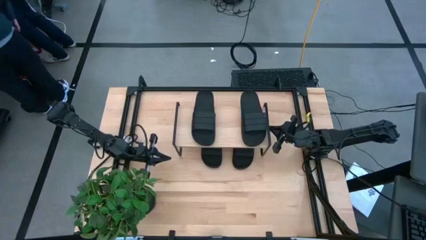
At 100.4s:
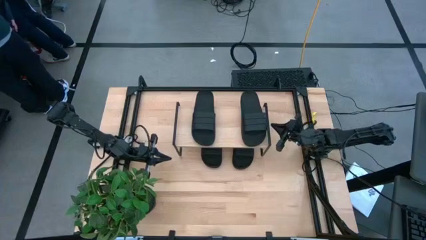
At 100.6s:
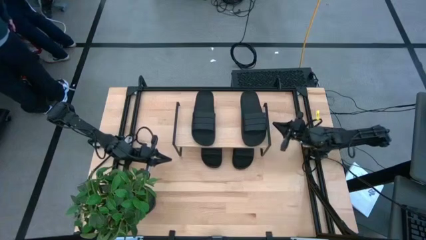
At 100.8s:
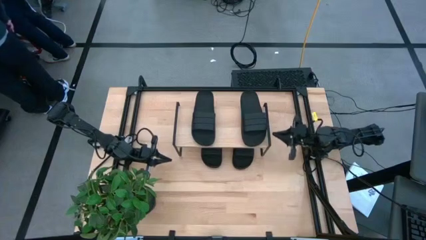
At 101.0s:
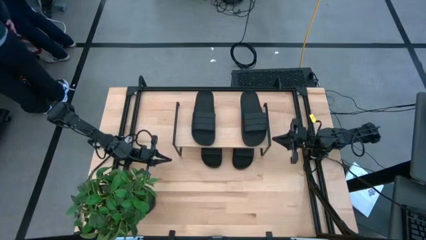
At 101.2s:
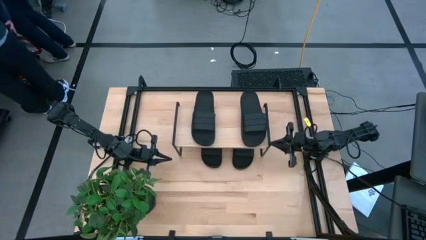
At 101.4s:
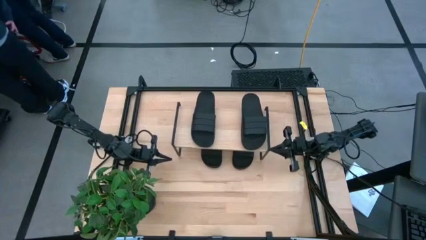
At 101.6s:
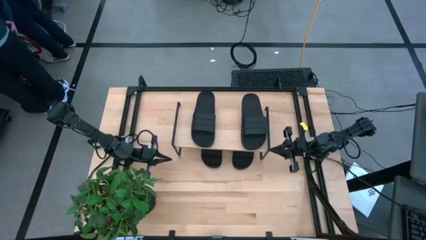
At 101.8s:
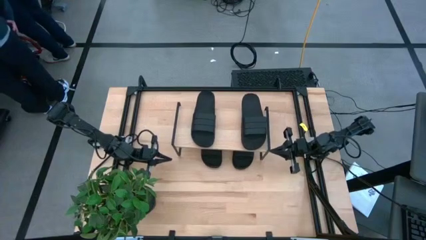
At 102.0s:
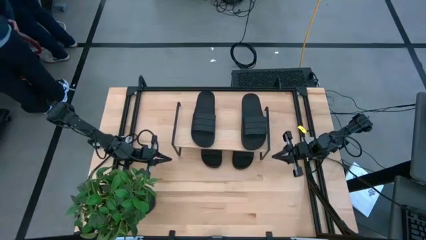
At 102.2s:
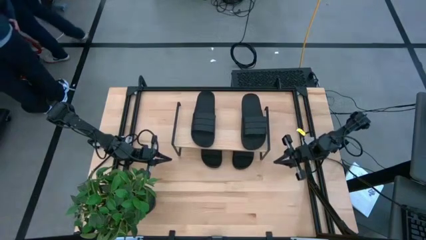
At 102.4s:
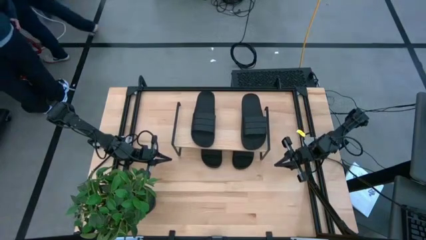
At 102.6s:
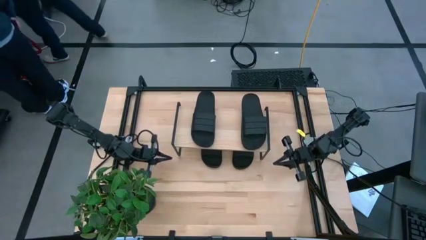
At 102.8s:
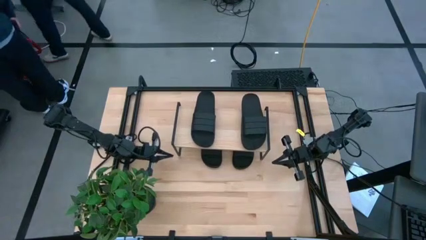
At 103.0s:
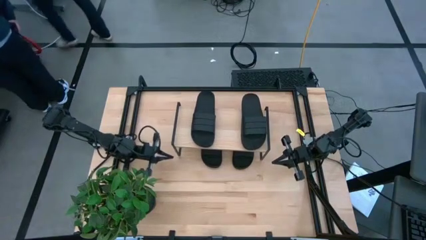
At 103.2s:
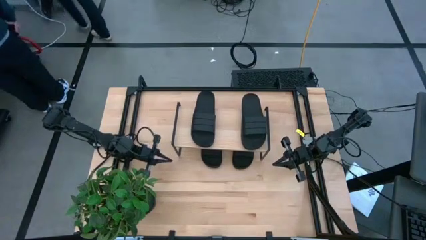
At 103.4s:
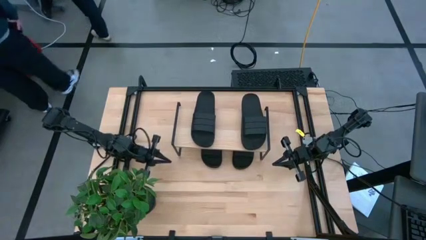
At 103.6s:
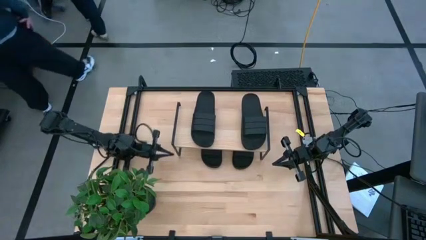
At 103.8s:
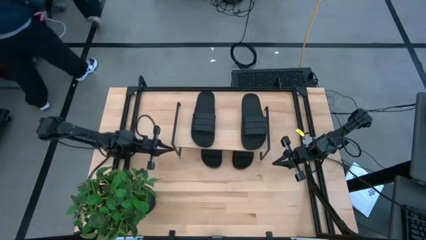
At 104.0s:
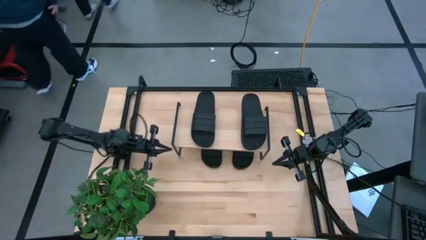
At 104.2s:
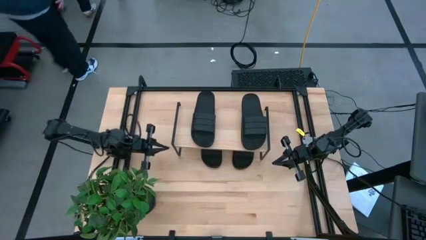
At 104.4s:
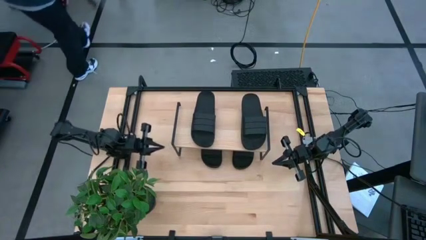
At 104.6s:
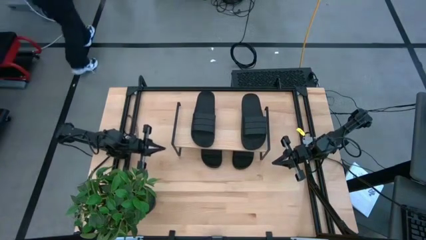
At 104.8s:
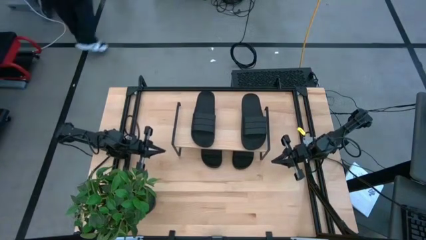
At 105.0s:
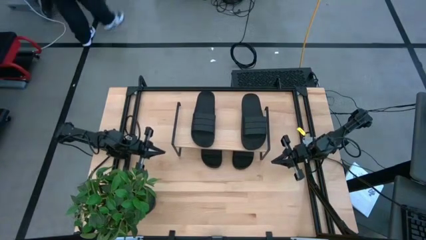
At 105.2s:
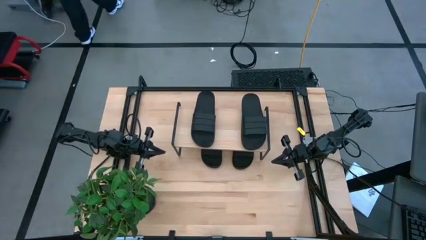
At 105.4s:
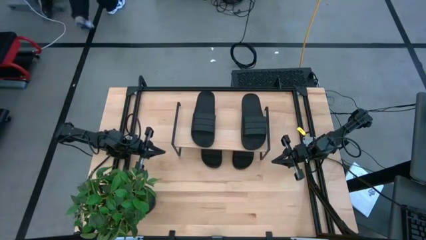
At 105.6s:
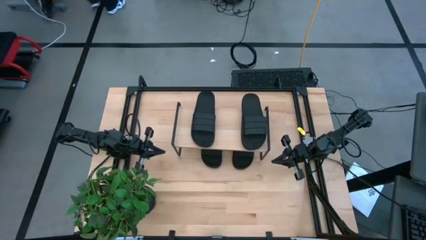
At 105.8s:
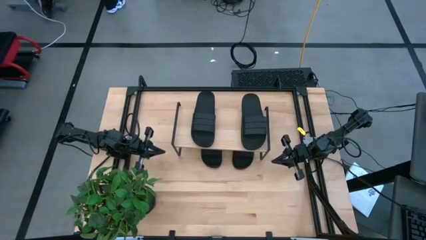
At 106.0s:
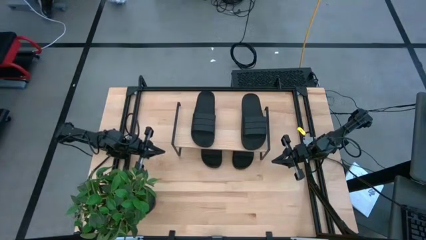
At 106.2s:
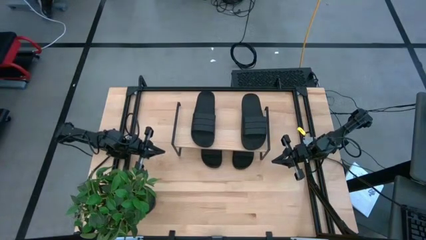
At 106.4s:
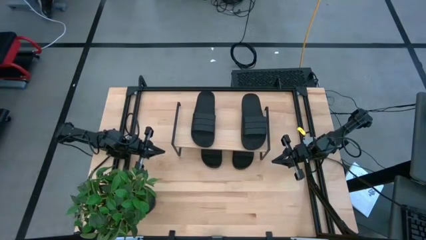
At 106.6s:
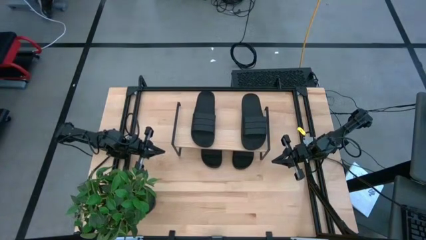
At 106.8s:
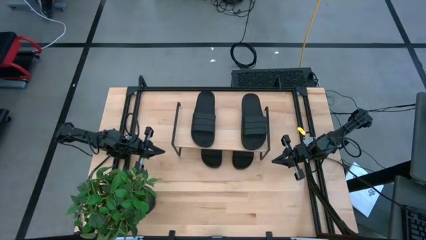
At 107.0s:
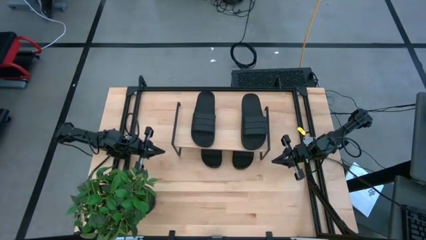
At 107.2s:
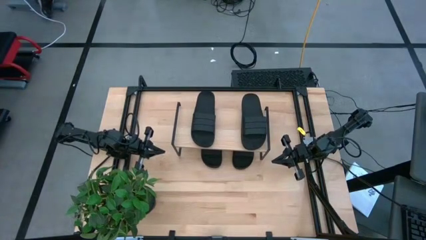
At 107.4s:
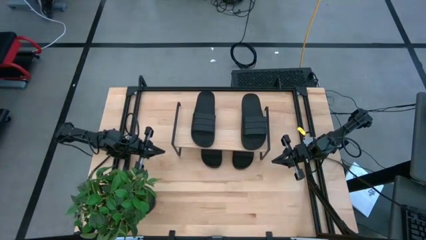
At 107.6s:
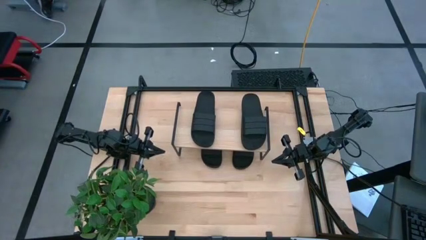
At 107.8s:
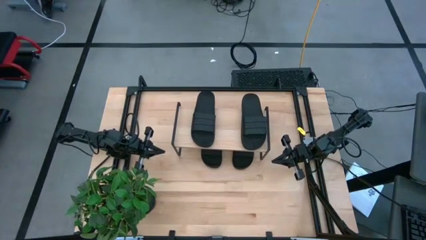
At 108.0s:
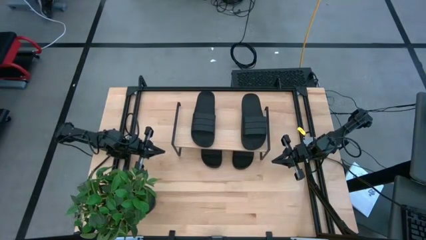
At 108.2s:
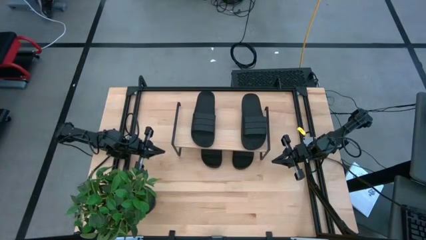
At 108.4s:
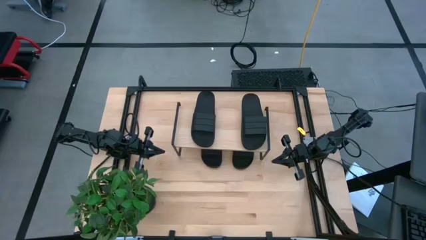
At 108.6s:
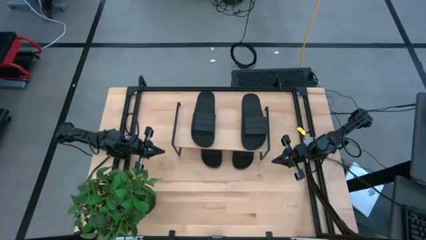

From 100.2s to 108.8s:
Task: Pick and place slides into the shelf
Return to Home Position

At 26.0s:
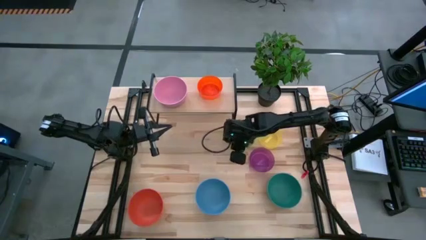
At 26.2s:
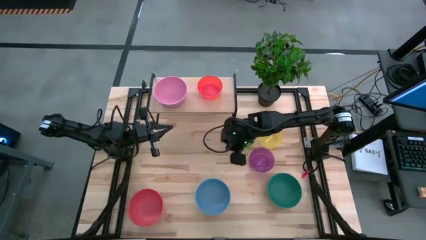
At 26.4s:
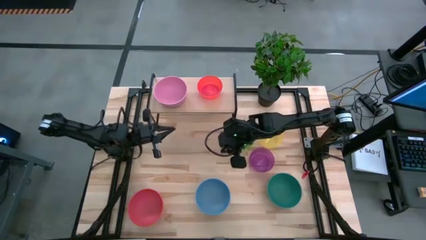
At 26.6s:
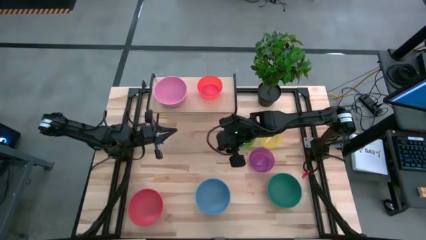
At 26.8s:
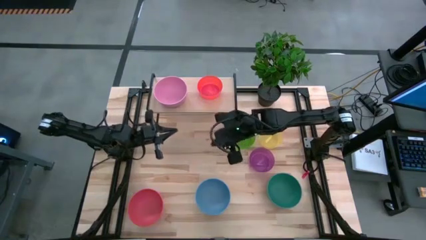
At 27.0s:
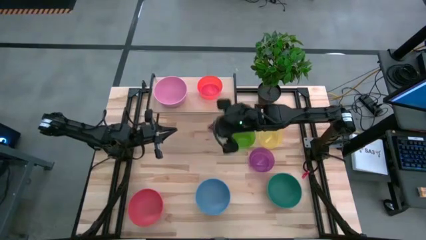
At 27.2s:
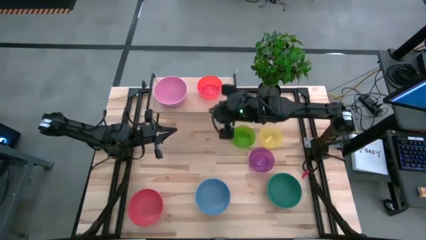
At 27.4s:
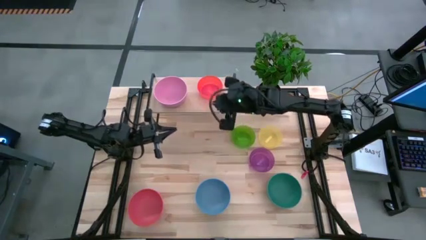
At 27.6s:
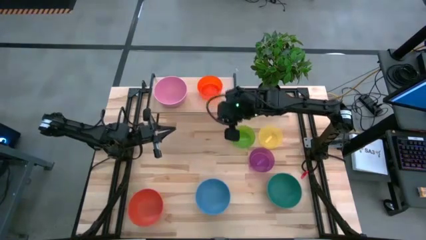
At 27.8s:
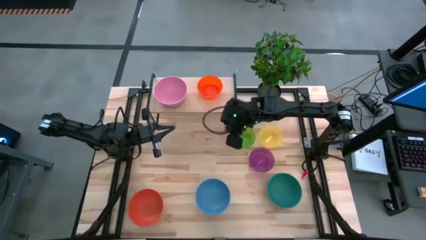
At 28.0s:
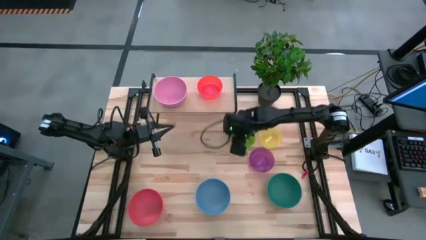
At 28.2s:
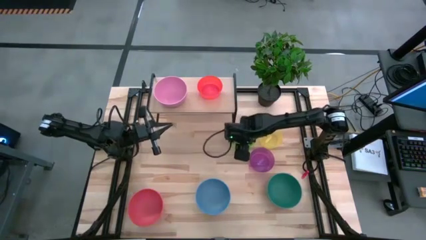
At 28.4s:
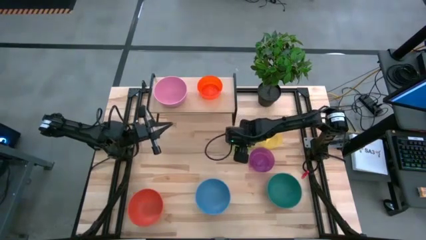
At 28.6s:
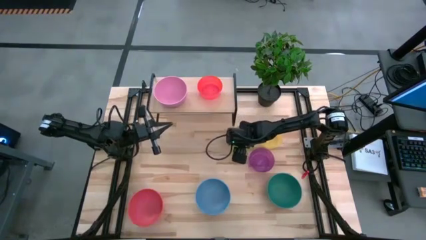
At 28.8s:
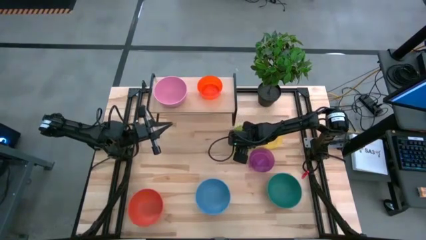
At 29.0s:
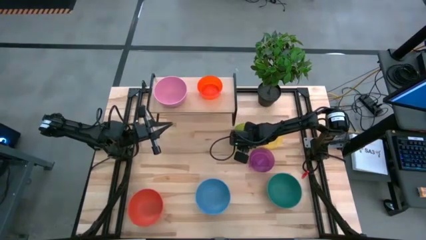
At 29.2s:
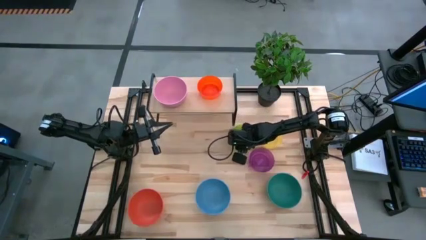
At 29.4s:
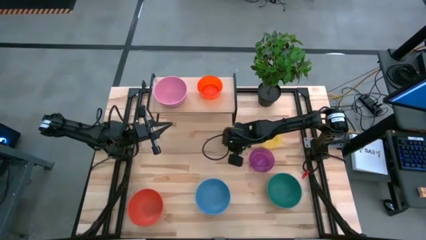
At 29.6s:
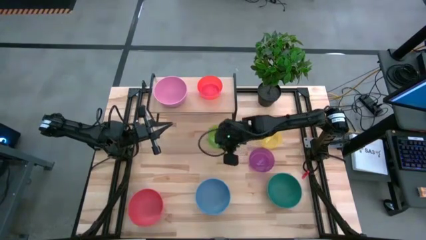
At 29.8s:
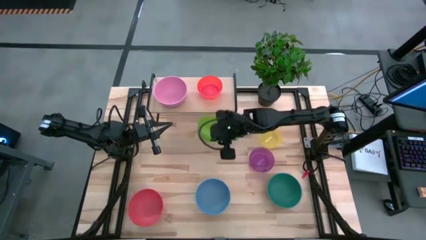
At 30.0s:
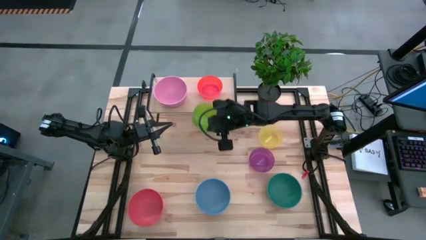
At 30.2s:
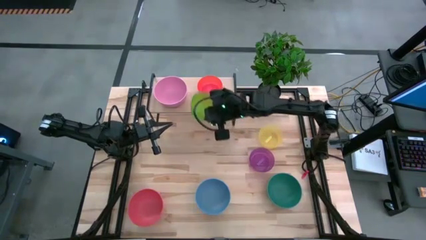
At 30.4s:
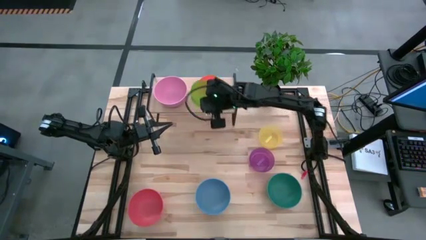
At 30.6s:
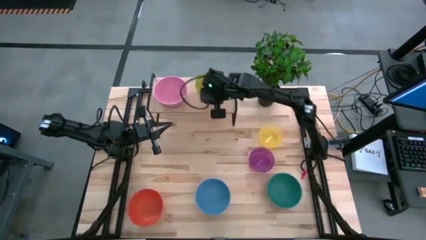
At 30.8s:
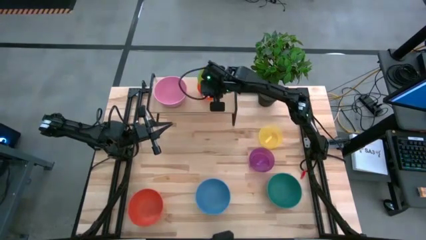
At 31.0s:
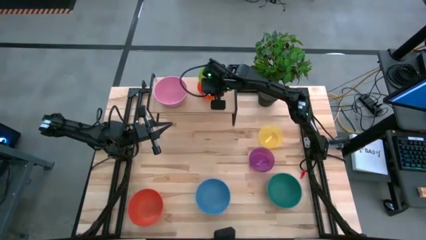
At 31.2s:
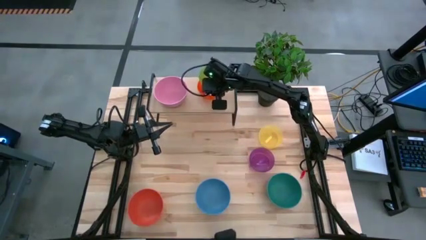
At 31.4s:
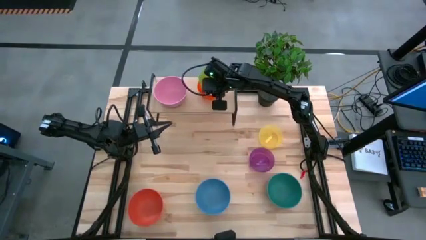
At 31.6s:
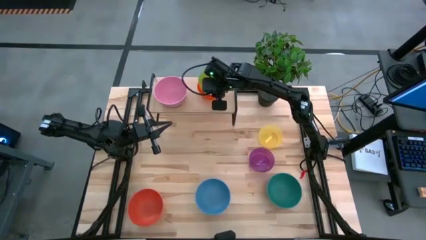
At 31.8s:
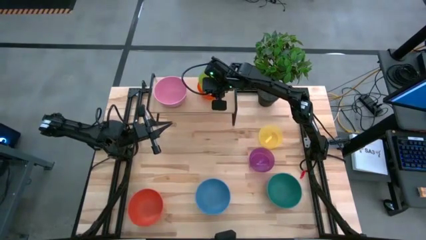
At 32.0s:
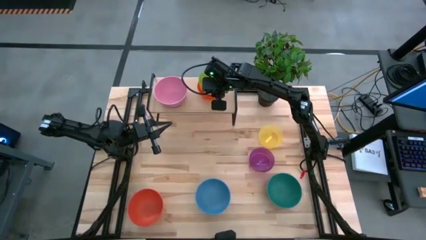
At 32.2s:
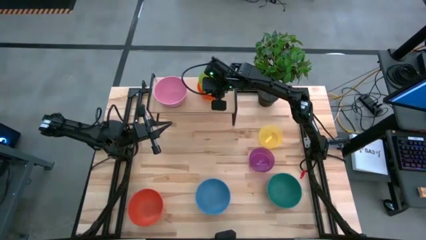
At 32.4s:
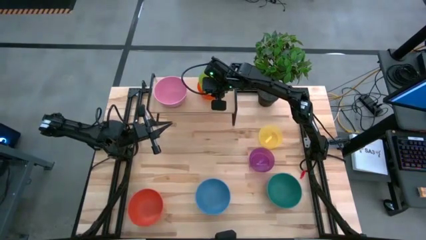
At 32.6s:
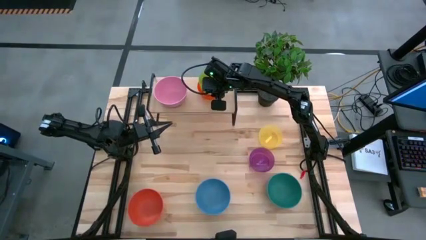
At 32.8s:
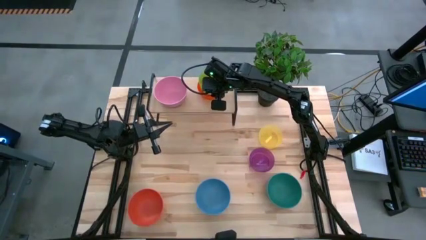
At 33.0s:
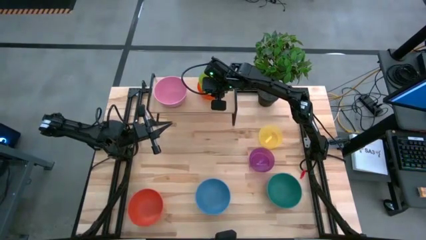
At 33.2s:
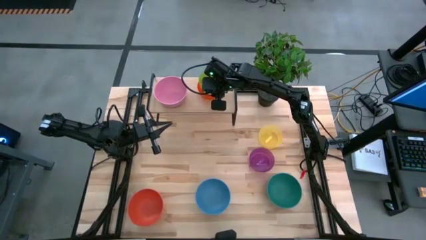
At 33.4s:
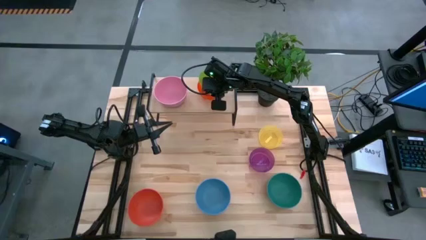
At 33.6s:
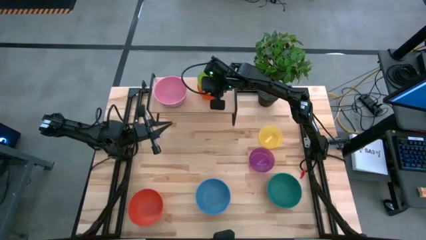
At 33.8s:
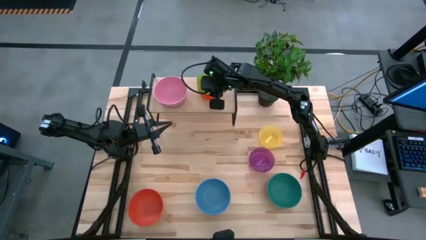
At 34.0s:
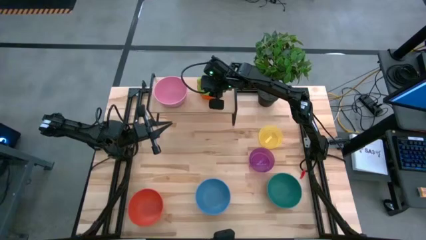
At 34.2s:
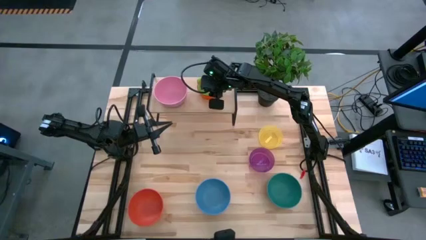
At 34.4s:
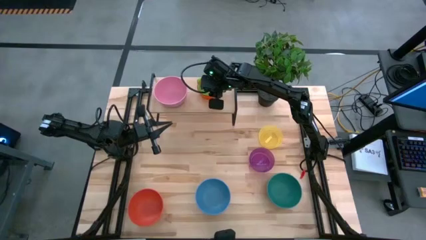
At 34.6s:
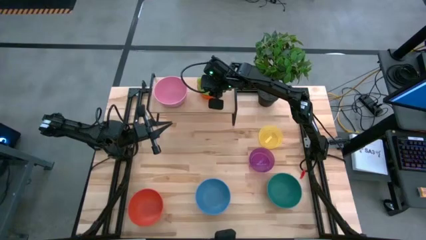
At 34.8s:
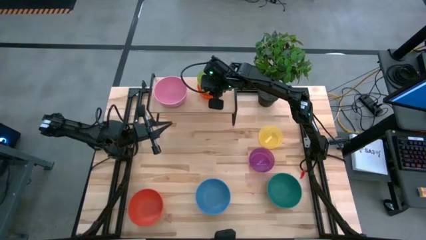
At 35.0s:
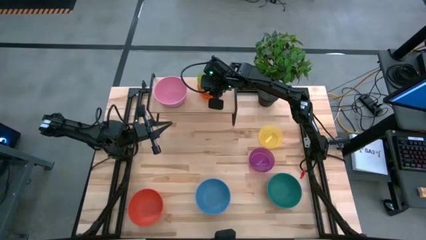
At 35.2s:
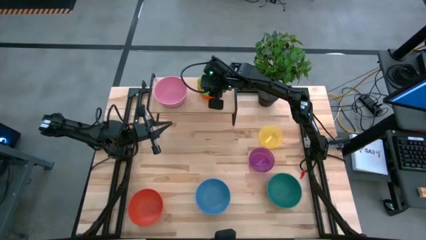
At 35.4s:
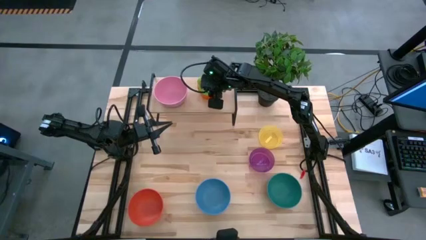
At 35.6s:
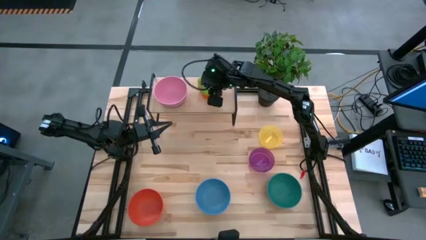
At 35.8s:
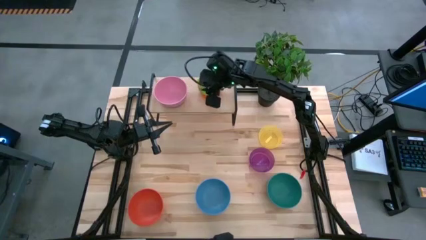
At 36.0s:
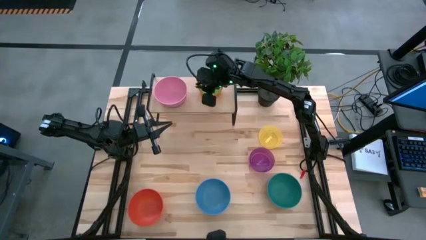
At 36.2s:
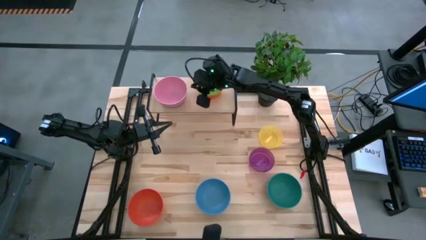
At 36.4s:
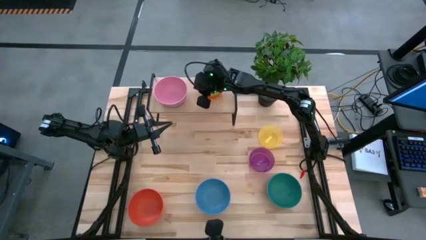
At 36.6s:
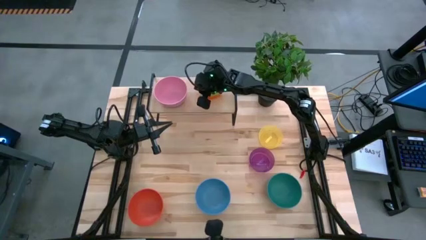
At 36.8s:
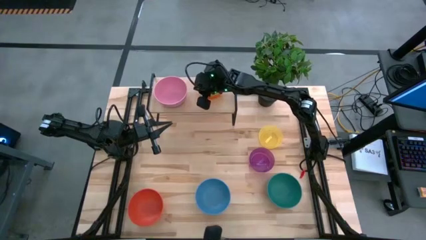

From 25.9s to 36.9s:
Task: Place and stack bowls onto a shelf
Stack the small green bowl on top of the small orange bowl on the shelf
